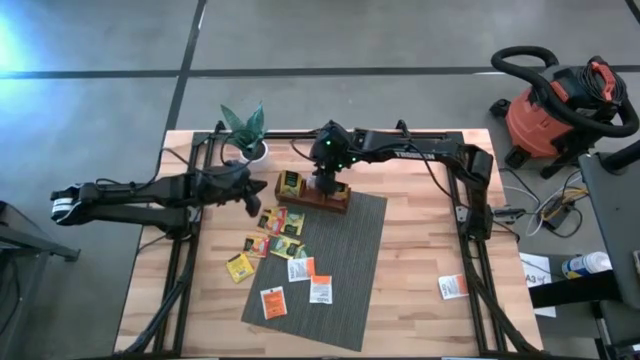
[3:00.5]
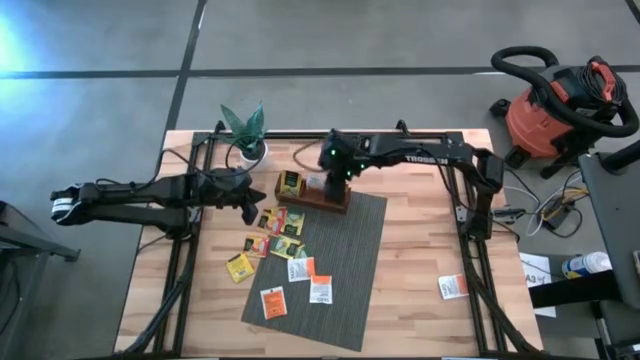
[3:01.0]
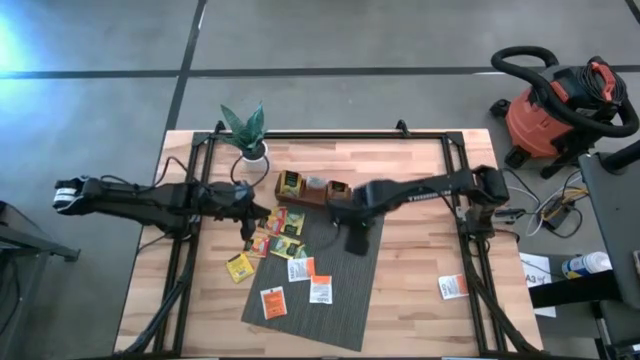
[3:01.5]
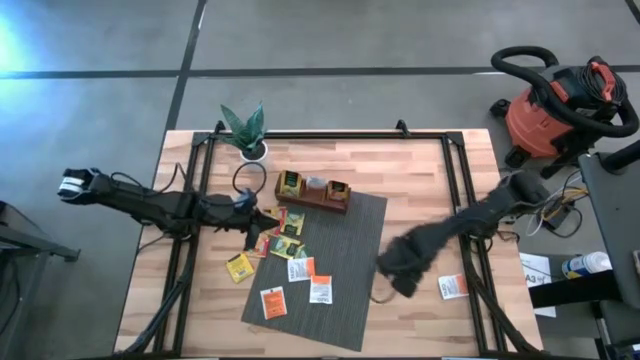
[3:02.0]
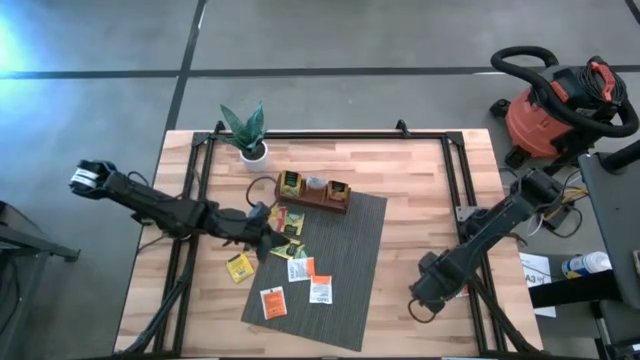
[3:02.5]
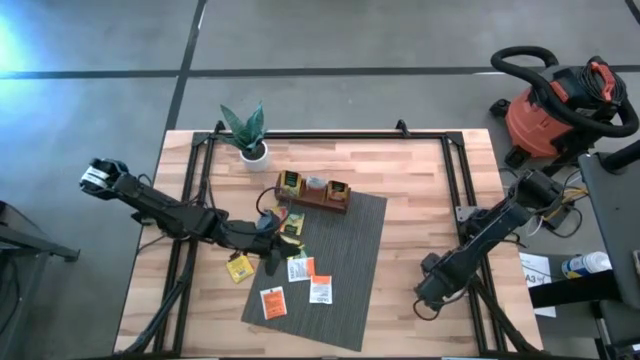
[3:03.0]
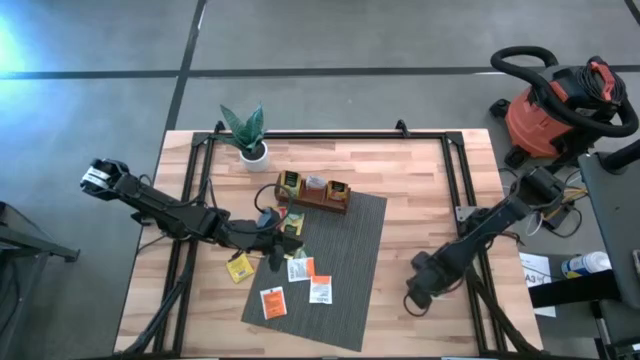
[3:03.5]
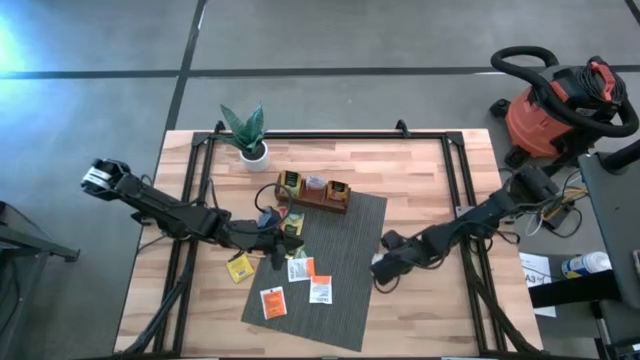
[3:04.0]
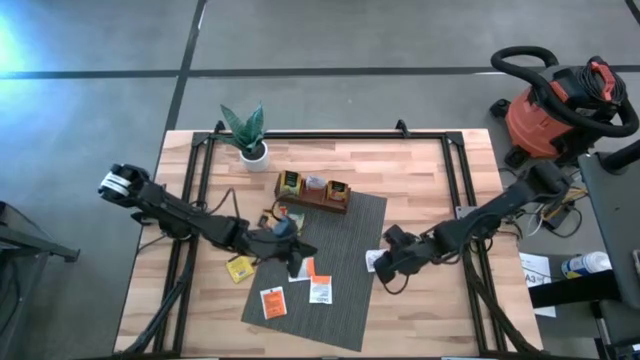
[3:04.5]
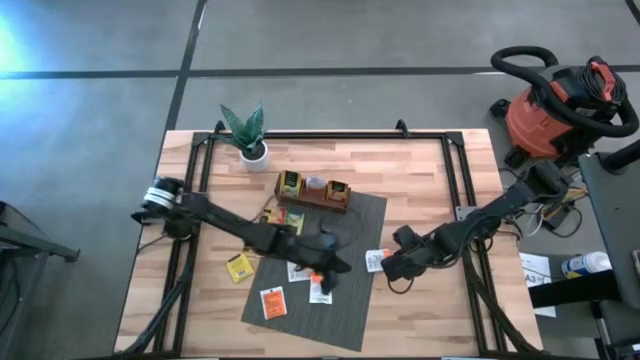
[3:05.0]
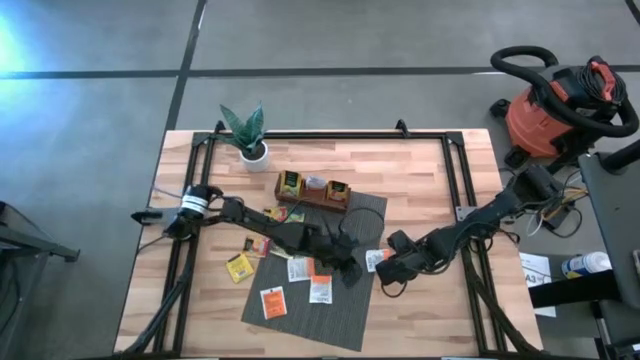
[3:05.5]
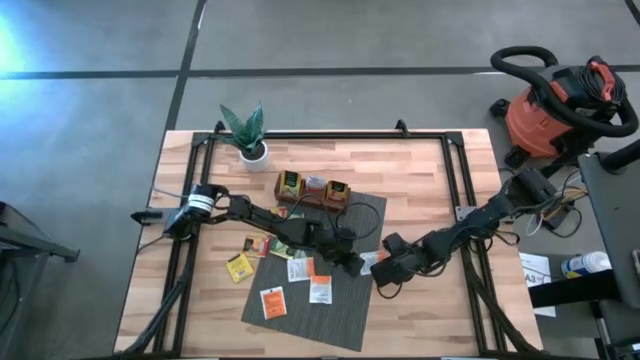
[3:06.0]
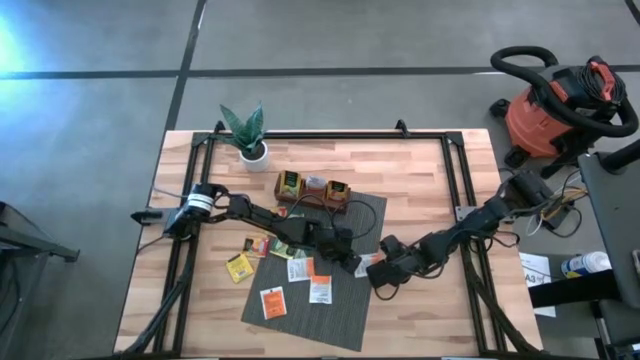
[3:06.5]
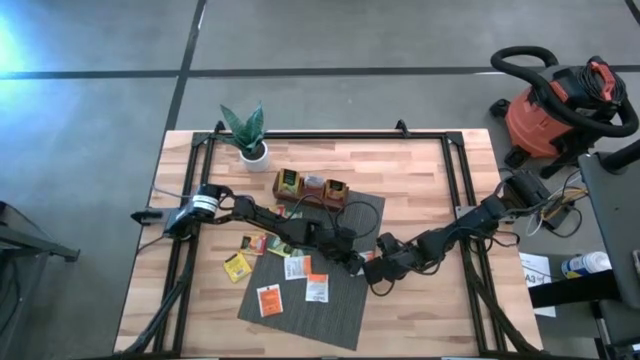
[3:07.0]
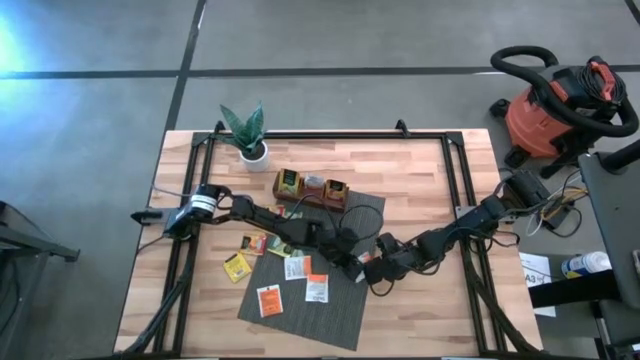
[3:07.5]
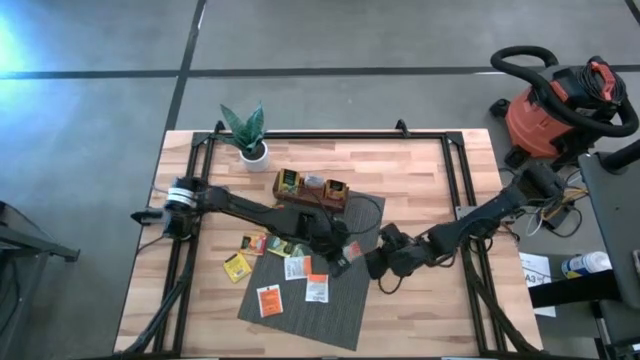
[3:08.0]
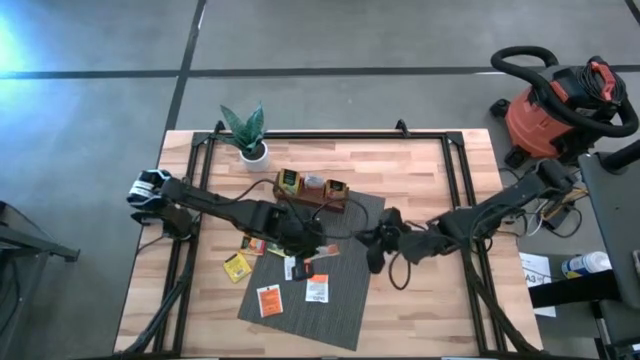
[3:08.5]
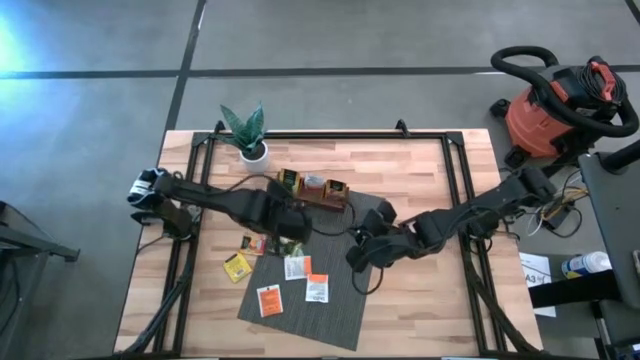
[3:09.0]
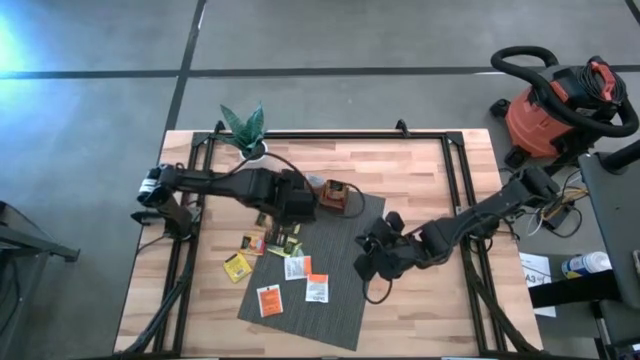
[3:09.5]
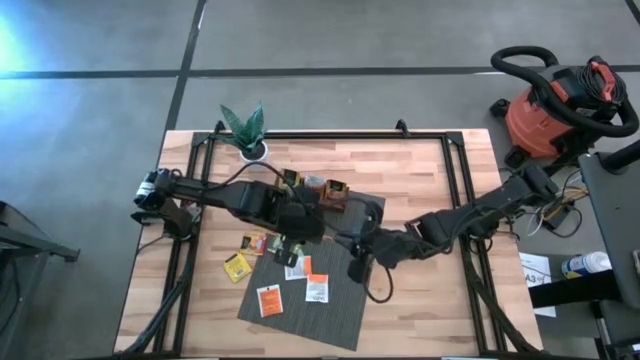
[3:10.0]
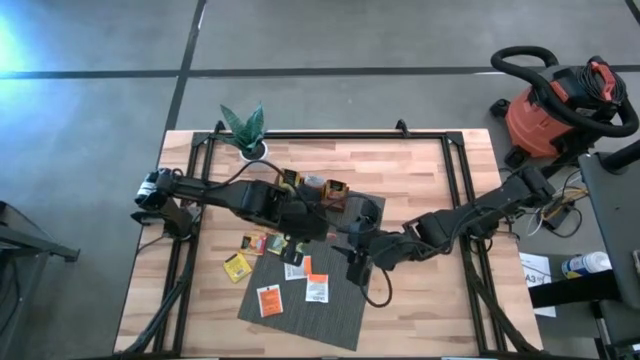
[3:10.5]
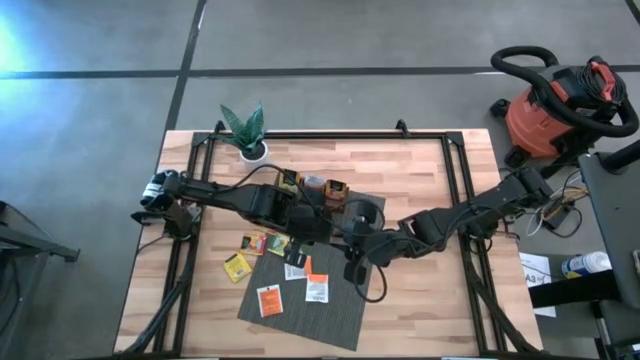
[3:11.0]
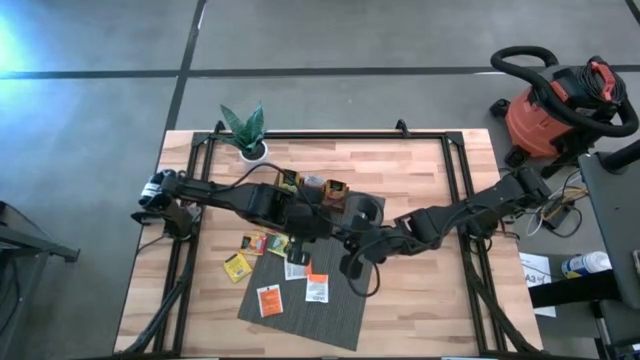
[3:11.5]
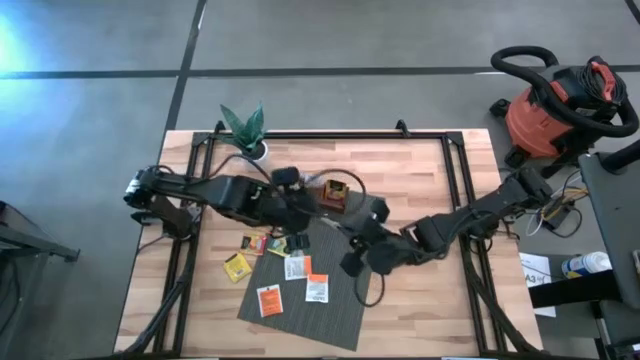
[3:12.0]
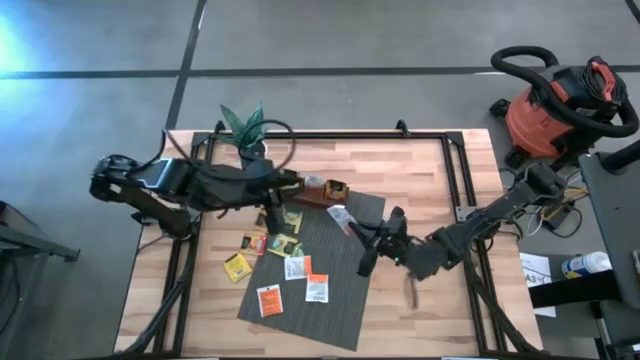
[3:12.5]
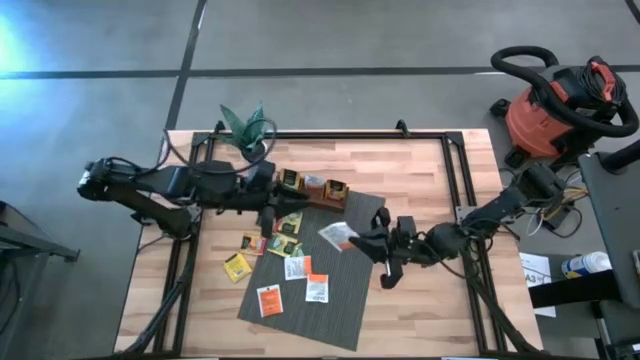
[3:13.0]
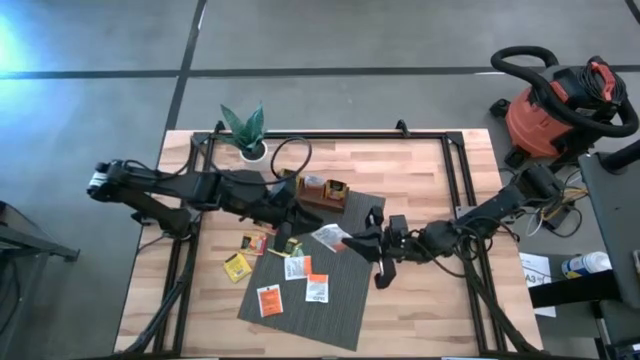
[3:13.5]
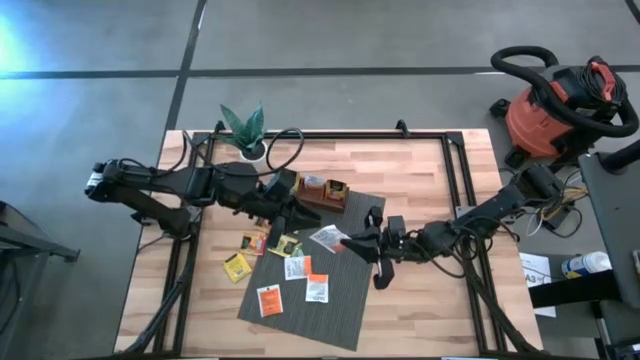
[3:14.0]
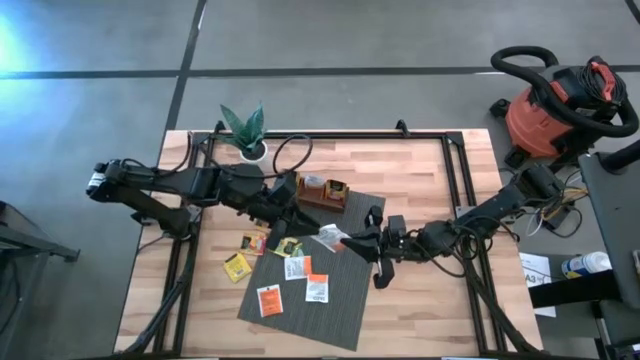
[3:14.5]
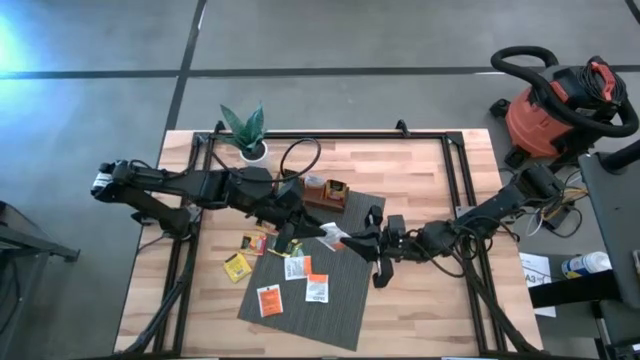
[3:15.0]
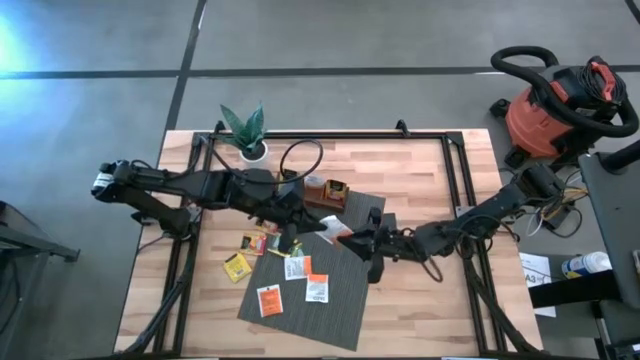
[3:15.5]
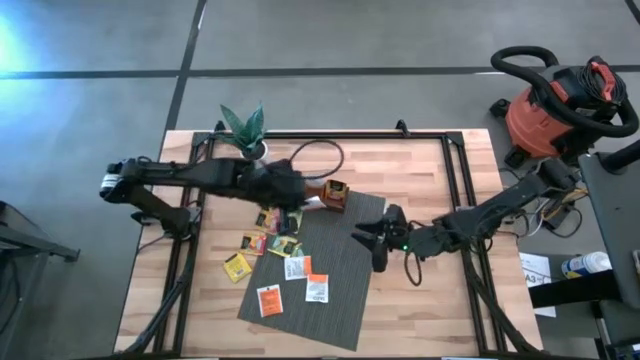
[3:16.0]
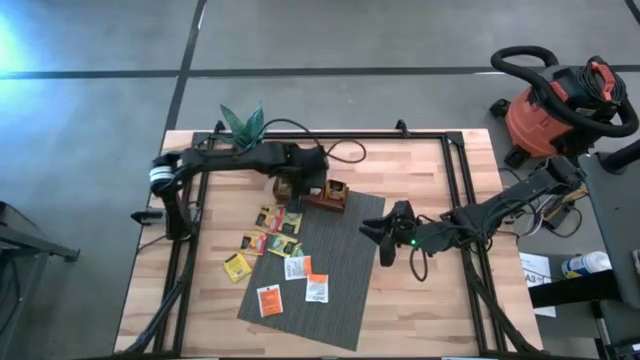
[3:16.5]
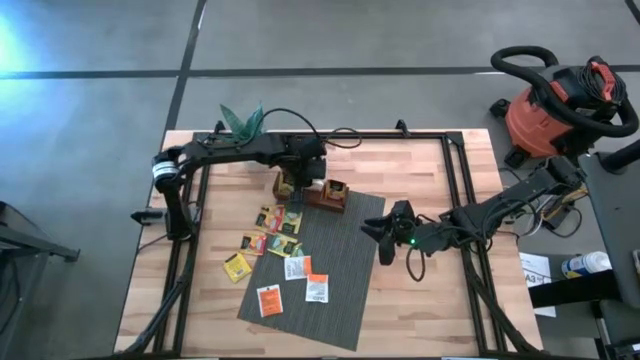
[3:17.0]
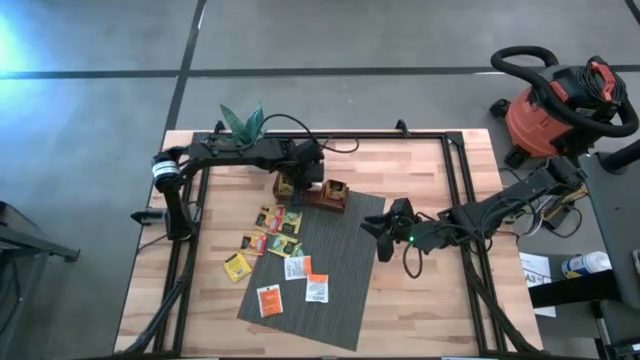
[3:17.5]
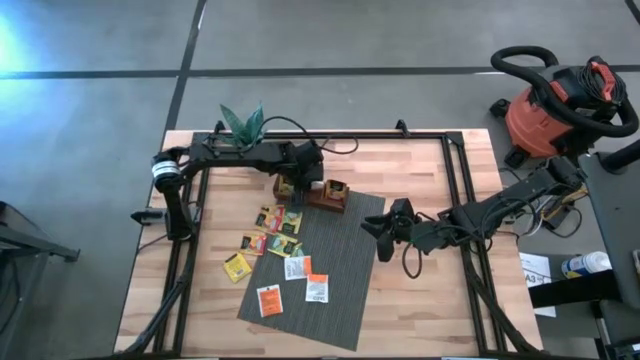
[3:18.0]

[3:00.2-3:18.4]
Task: Pick & Place Tea
Put the white tea bag into the middle compartment of the wooden organizer

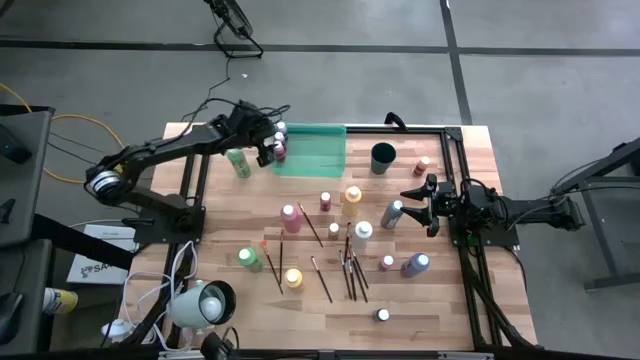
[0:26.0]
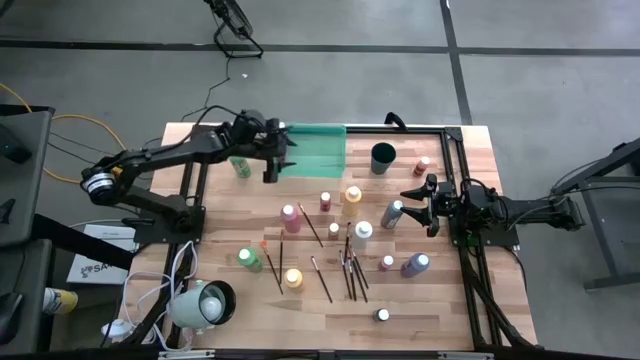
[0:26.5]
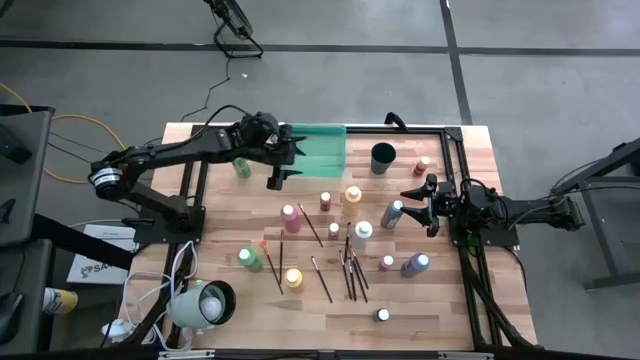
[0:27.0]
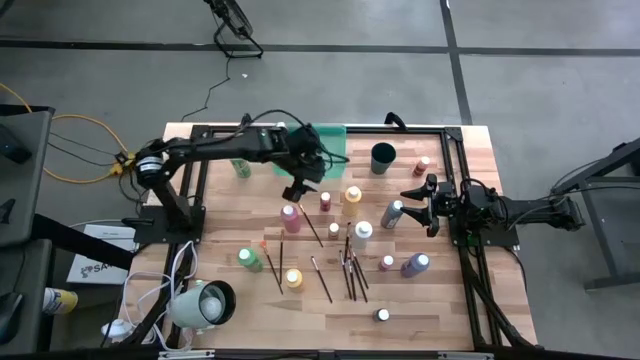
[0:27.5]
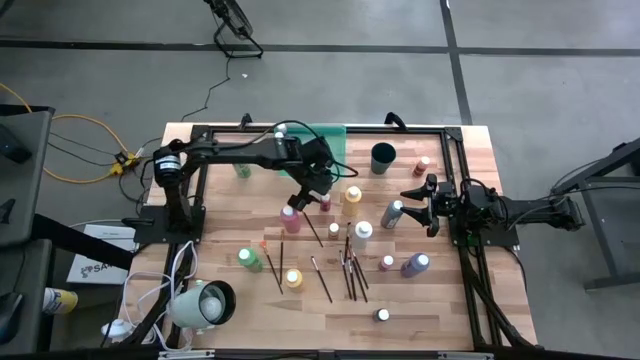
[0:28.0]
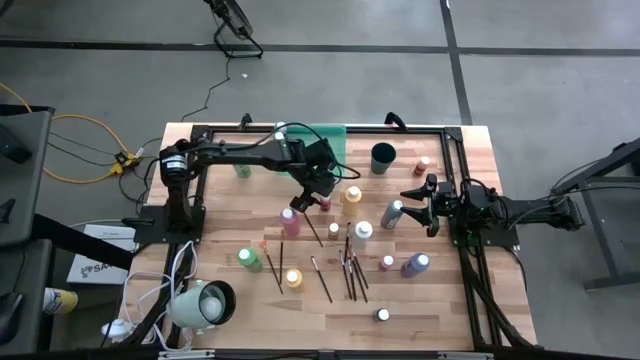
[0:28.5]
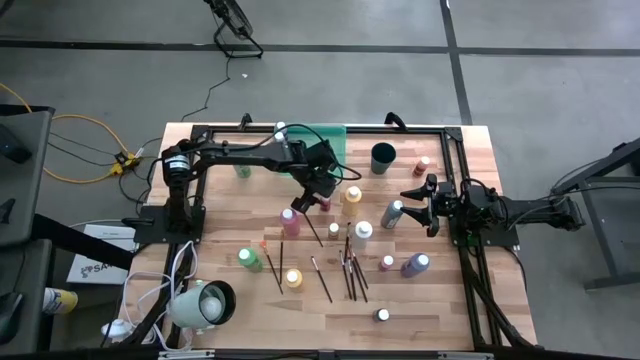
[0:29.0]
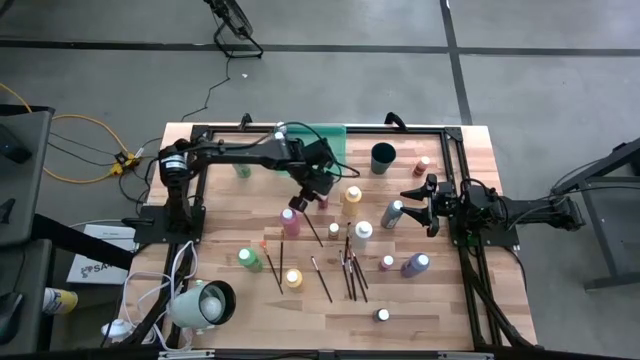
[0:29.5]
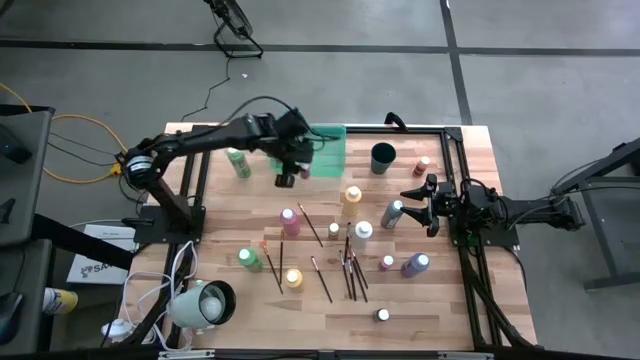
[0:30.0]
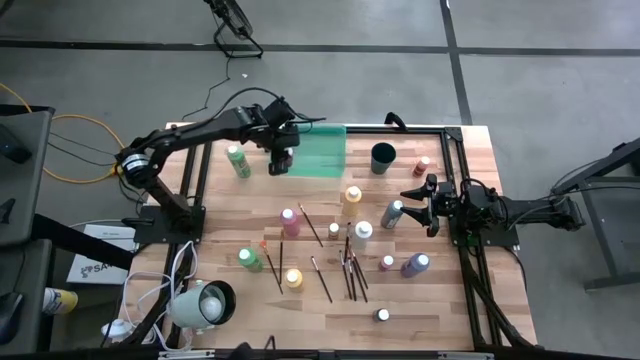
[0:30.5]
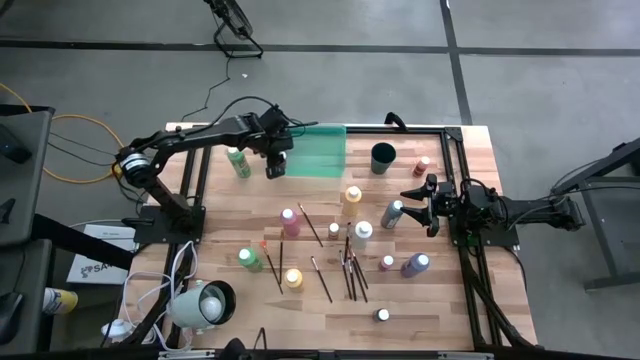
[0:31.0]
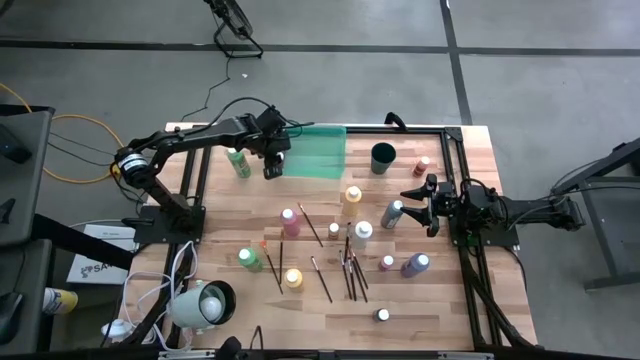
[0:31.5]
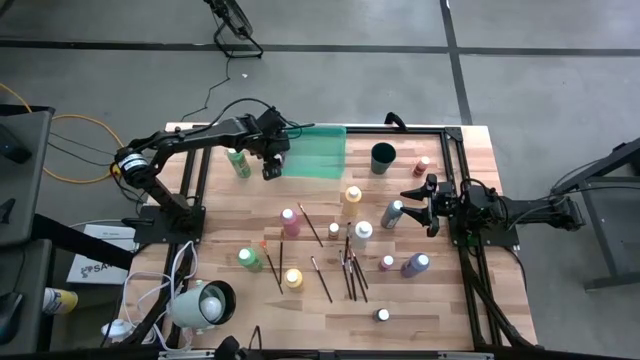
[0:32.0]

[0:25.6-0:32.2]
Task: Pick & Place Paint Supplies
Put the red paint bottle into the green bin
